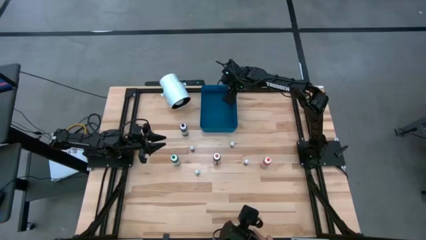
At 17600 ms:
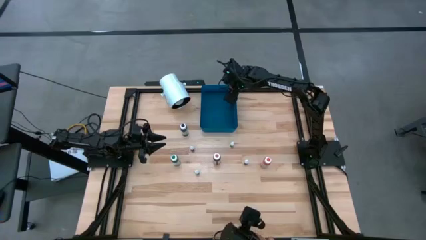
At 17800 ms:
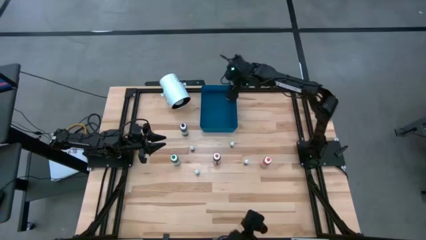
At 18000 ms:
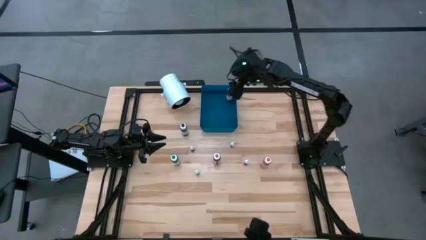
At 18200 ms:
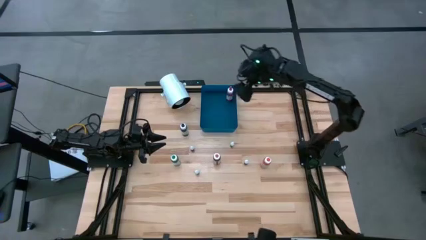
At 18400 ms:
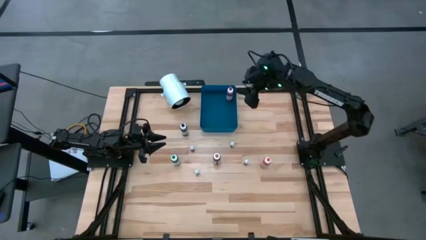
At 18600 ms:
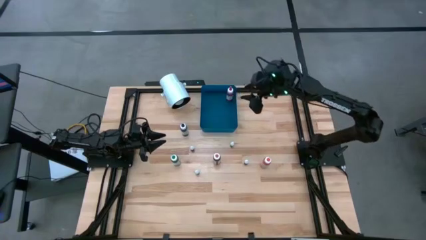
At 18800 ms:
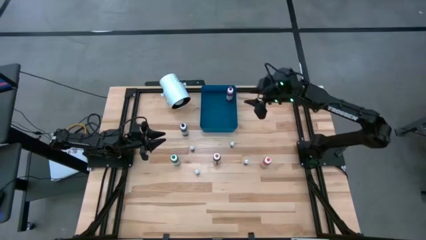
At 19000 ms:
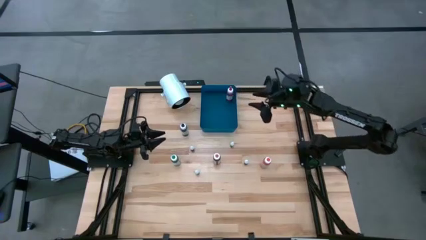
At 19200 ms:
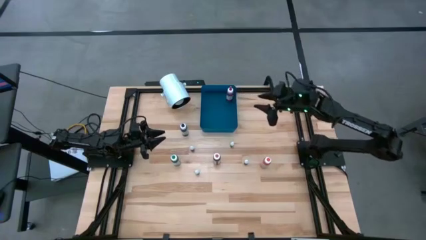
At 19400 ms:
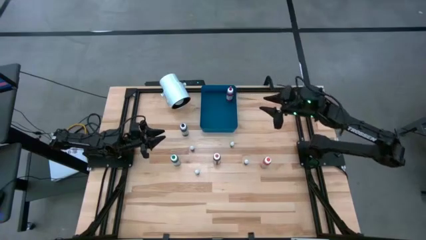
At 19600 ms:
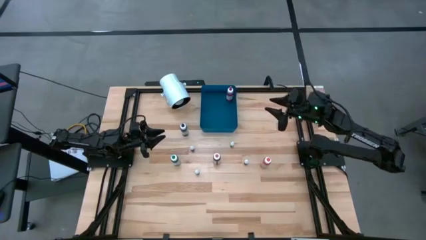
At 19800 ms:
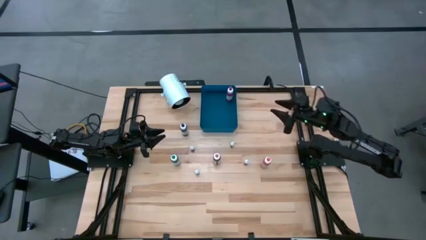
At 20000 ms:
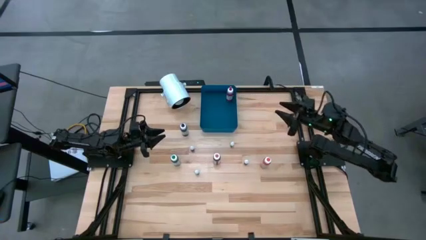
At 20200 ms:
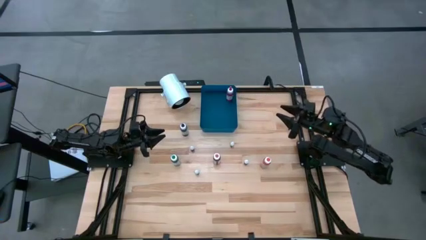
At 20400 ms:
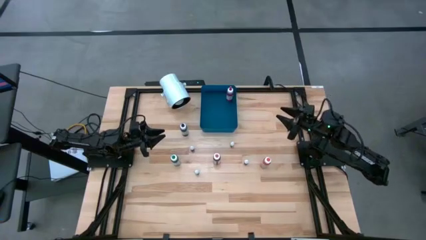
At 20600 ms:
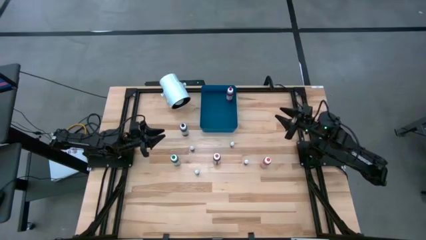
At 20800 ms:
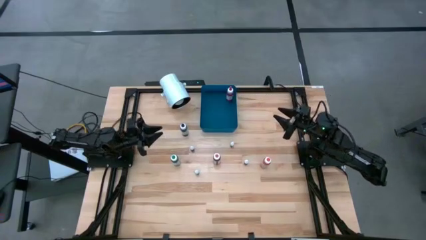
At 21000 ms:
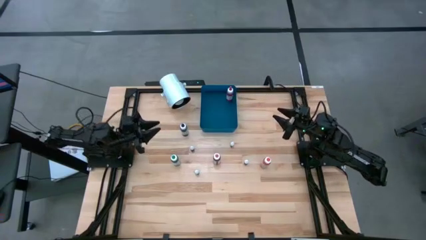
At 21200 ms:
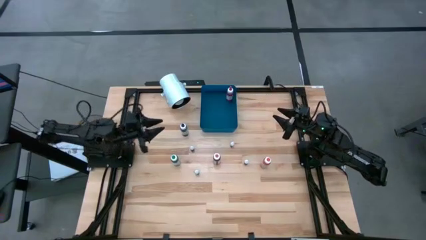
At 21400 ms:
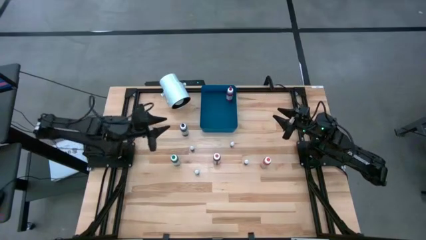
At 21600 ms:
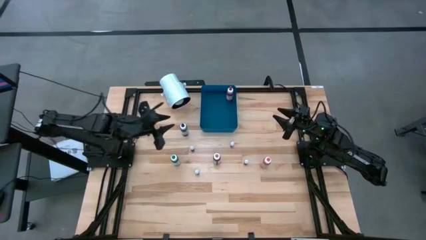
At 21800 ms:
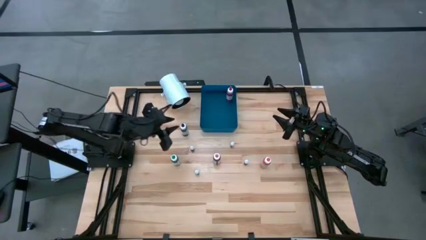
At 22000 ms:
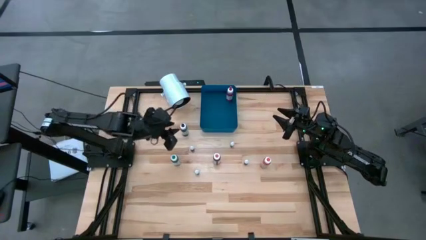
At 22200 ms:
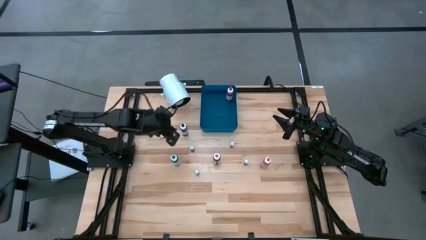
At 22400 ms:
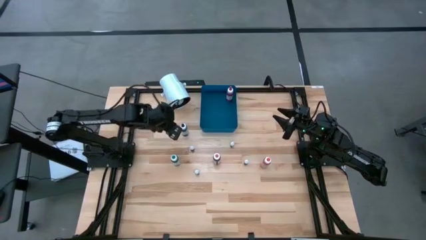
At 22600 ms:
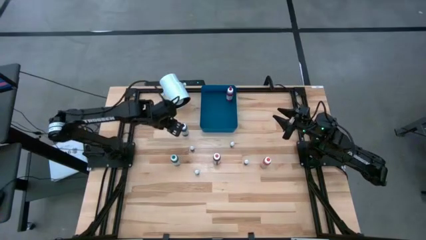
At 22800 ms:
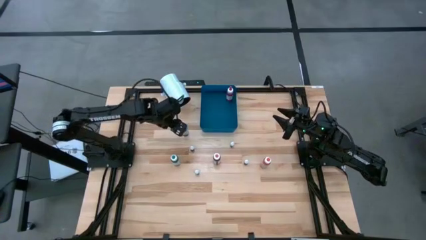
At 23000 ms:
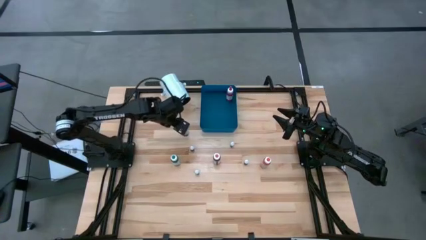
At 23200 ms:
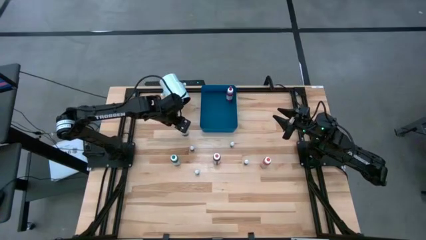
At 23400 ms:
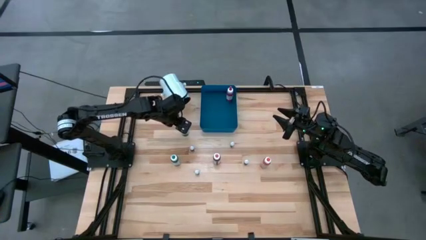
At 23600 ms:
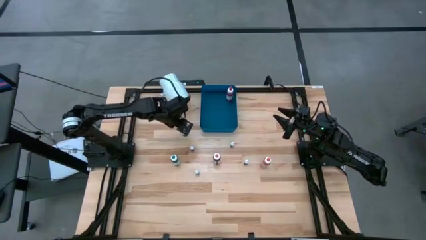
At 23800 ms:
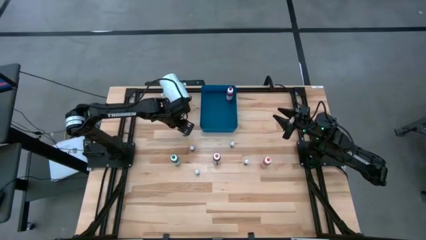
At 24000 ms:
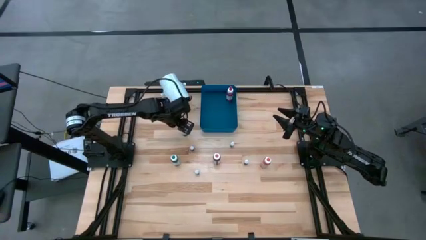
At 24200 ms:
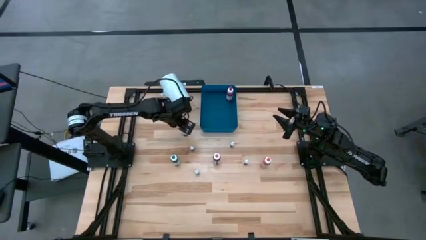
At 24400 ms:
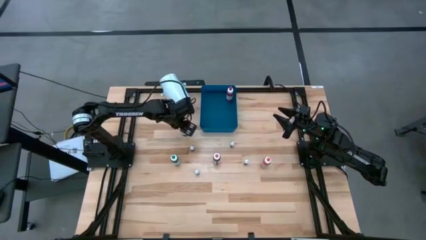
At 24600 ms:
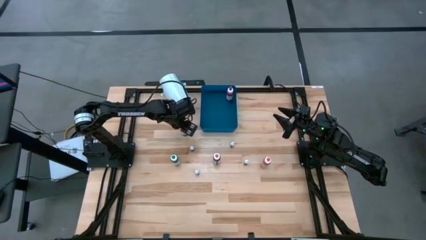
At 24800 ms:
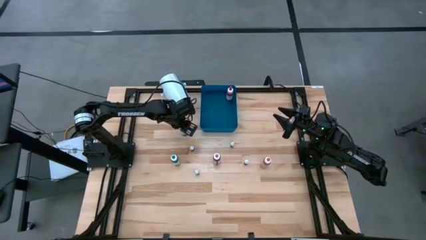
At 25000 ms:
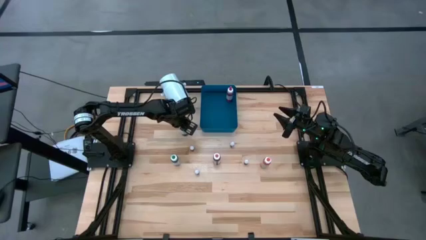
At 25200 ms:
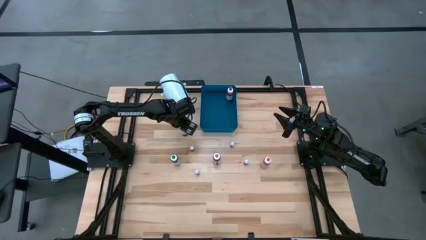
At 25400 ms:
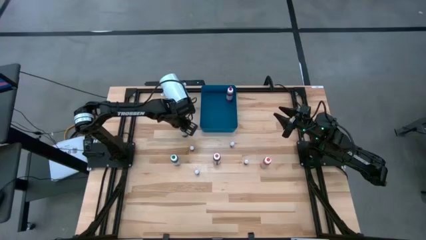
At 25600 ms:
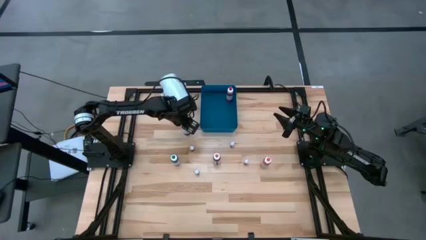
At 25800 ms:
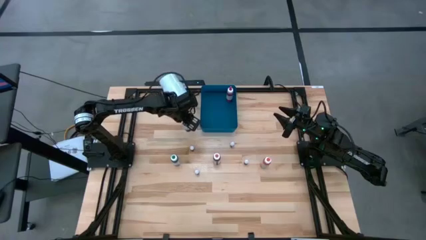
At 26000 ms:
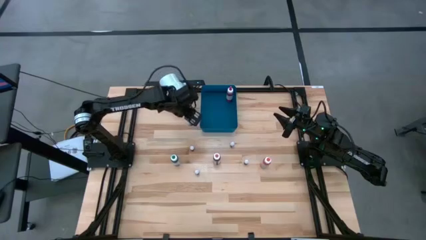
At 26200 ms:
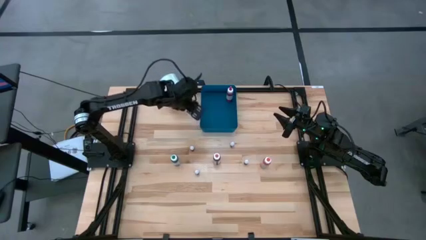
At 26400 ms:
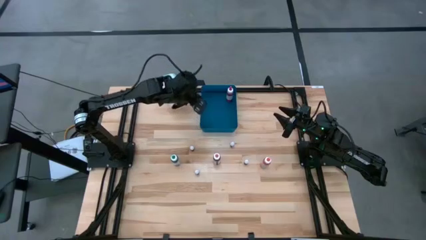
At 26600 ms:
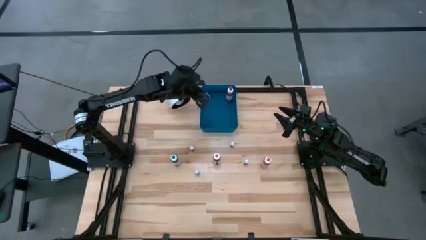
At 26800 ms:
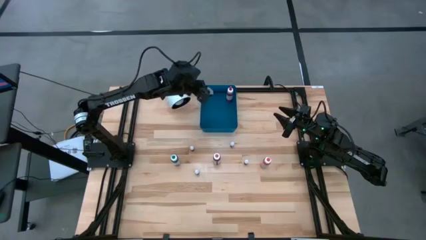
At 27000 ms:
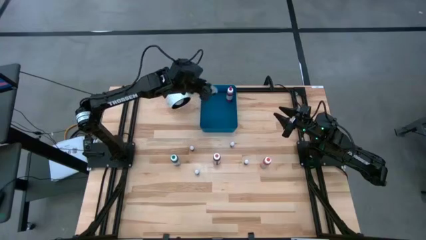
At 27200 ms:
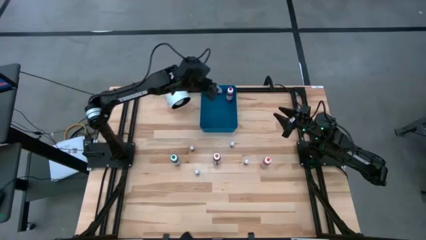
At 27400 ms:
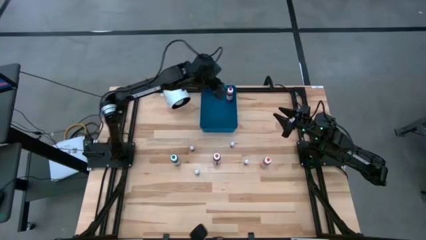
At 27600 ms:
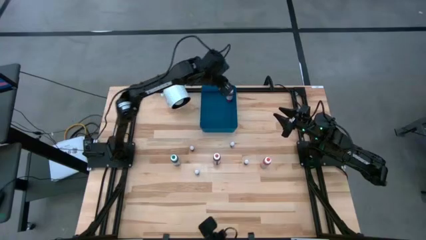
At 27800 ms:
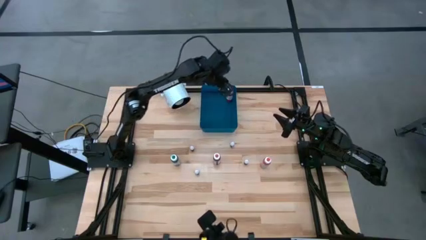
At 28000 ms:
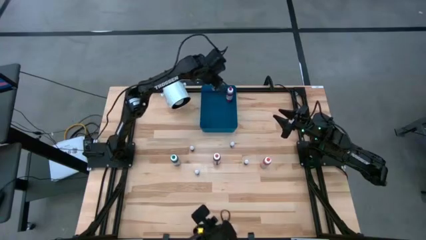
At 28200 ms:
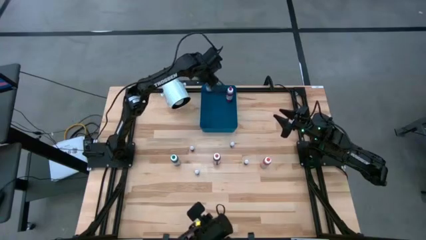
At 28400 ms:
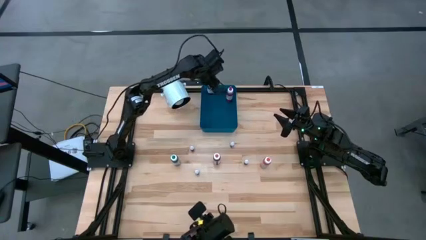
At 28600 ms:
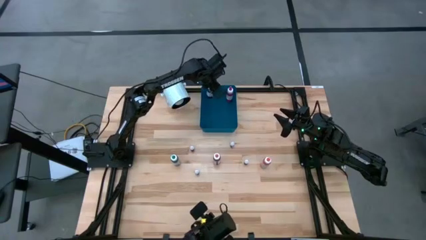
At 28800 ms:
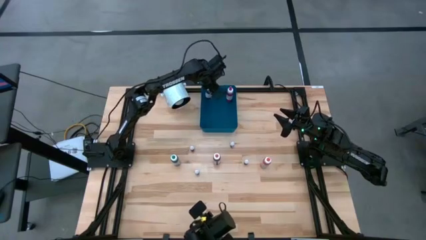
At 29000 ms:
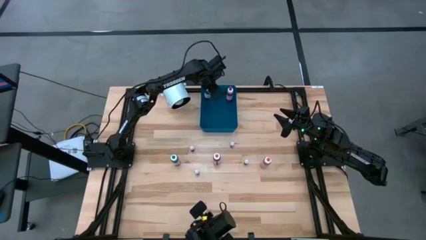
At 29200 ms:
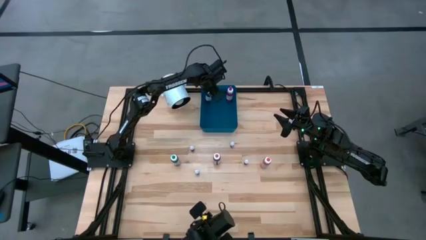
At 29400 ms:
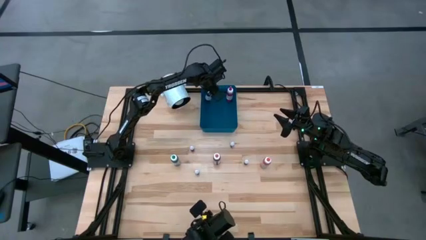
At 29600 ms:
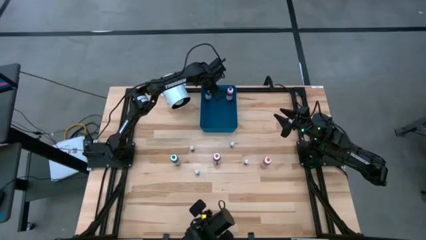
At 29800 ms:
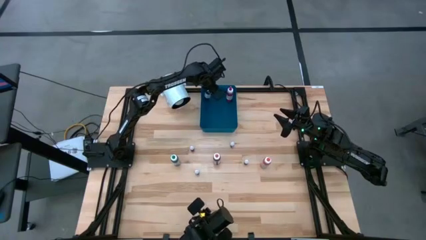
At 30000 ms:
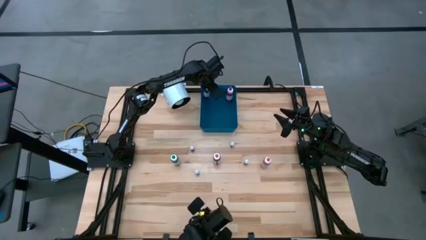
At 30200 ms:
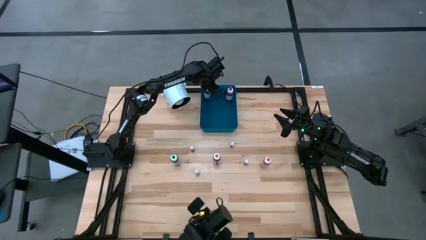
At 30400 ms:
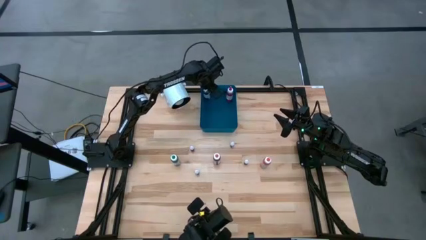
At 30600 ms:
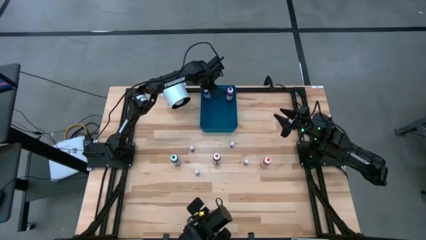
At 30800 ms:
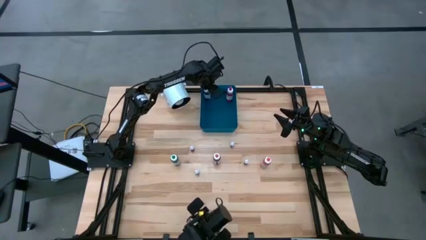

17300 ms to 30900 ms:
Task: Pick & Place food coloring
Put the large black food coloring bottle into the blue bin
